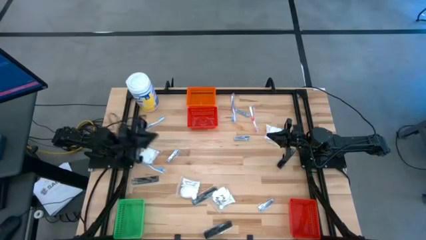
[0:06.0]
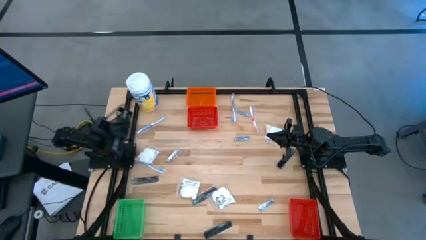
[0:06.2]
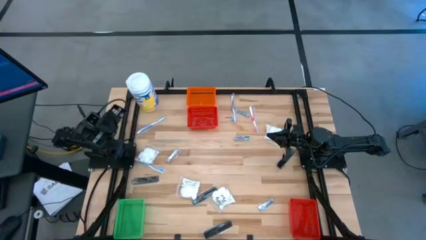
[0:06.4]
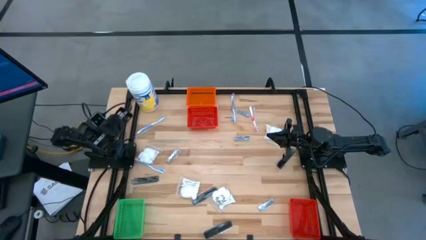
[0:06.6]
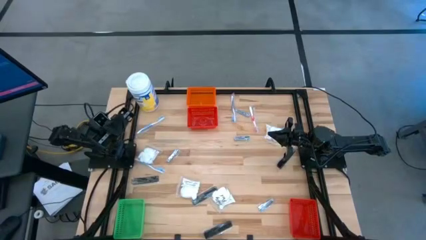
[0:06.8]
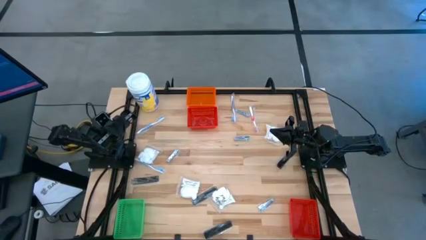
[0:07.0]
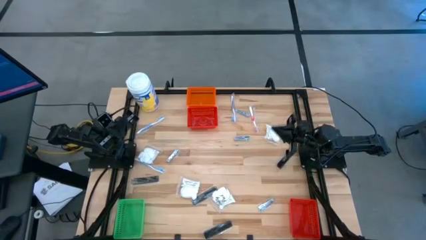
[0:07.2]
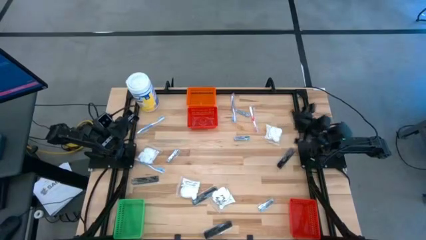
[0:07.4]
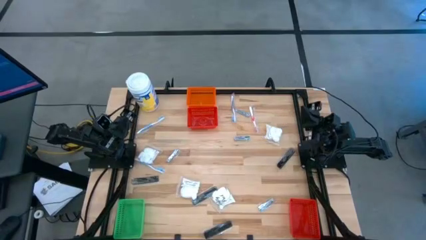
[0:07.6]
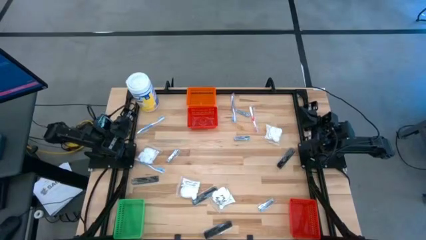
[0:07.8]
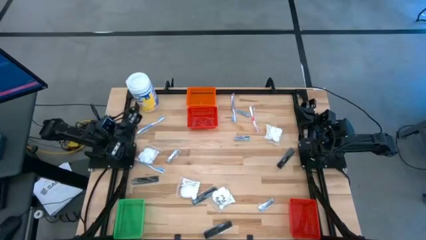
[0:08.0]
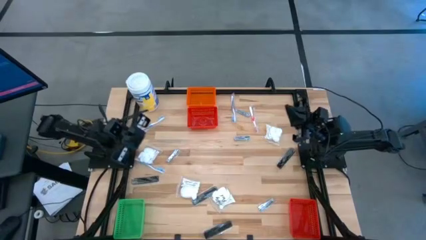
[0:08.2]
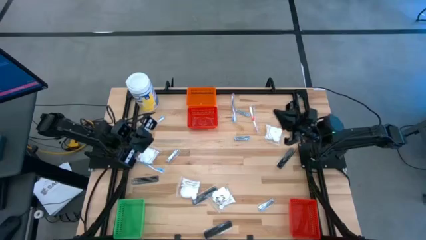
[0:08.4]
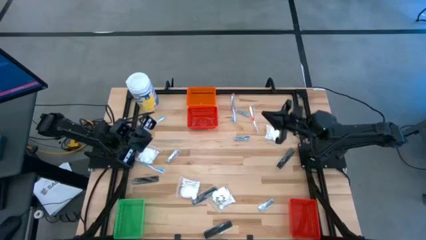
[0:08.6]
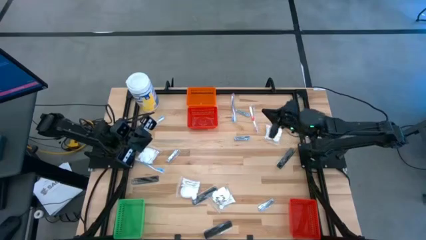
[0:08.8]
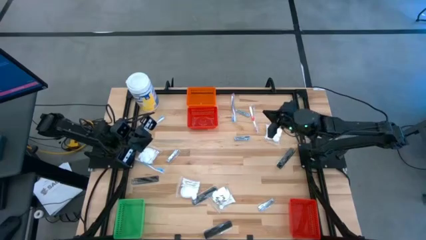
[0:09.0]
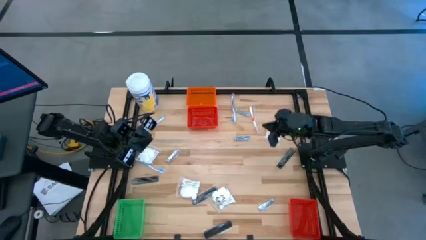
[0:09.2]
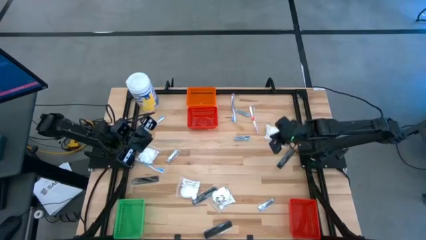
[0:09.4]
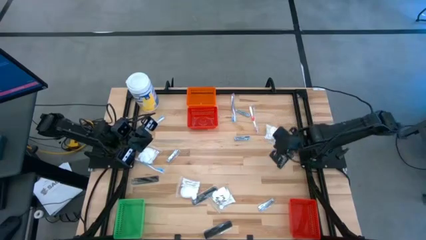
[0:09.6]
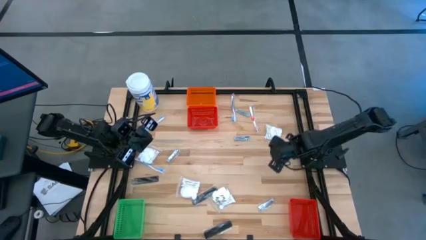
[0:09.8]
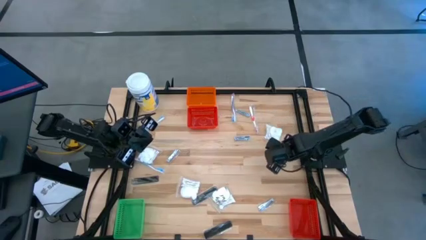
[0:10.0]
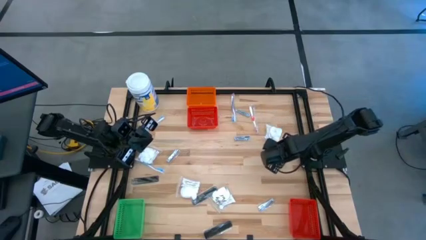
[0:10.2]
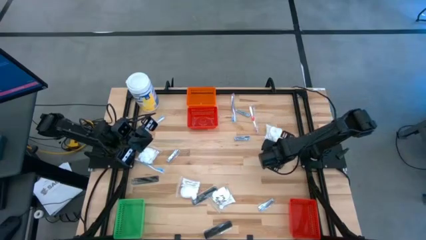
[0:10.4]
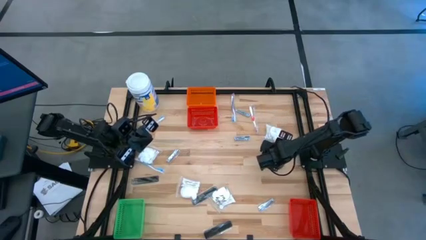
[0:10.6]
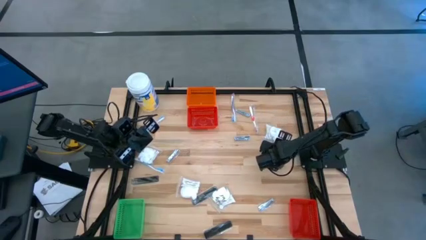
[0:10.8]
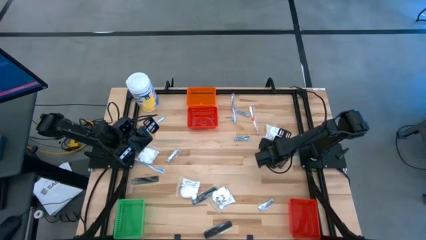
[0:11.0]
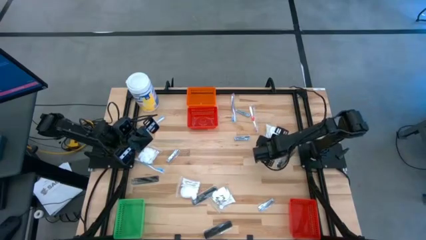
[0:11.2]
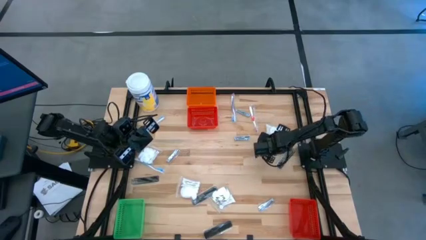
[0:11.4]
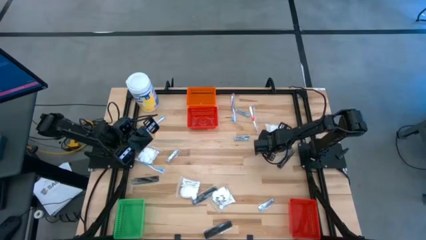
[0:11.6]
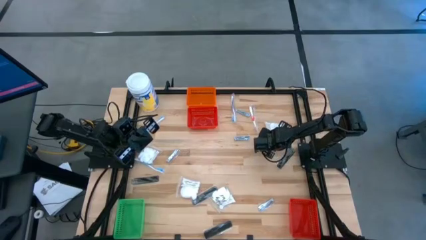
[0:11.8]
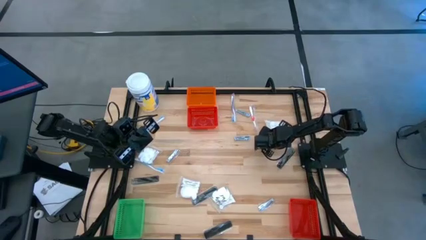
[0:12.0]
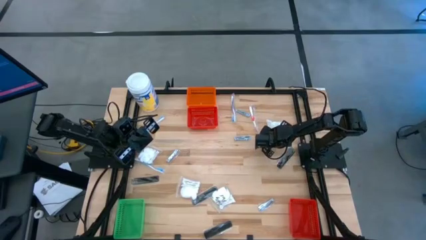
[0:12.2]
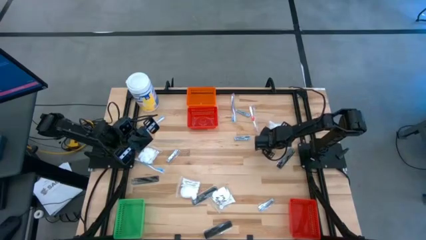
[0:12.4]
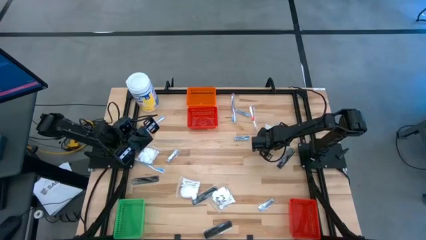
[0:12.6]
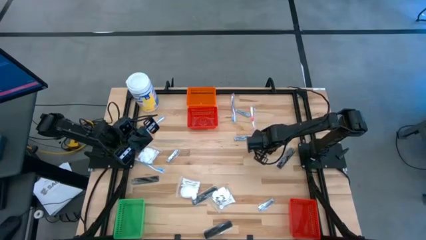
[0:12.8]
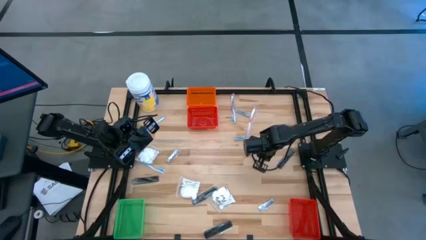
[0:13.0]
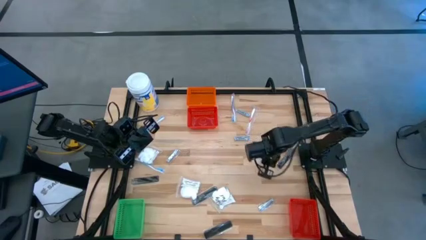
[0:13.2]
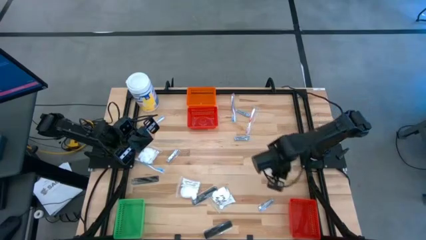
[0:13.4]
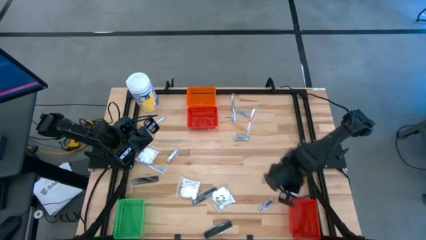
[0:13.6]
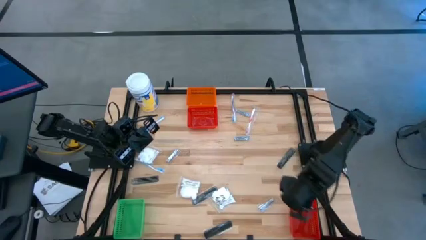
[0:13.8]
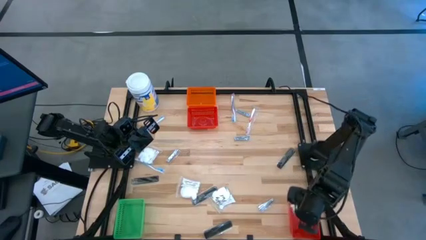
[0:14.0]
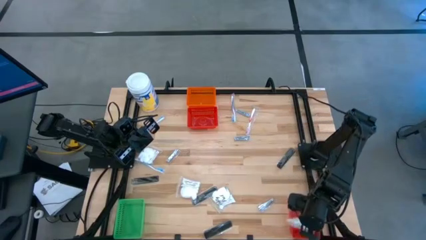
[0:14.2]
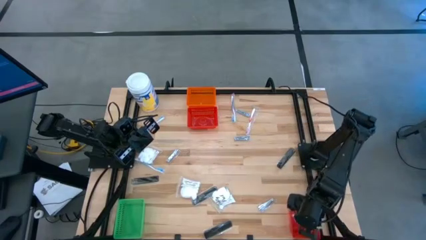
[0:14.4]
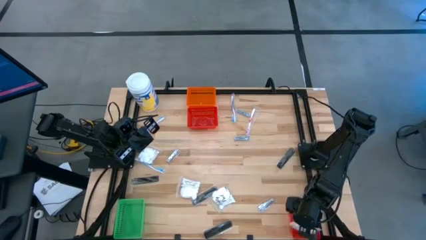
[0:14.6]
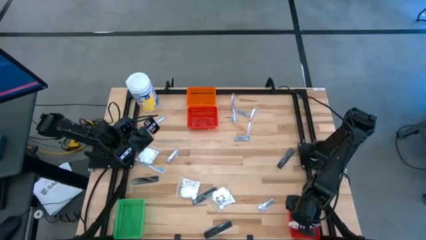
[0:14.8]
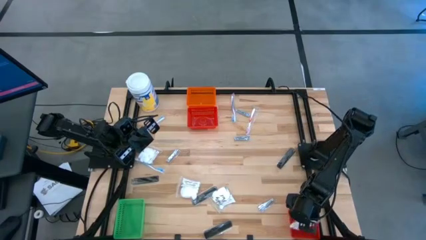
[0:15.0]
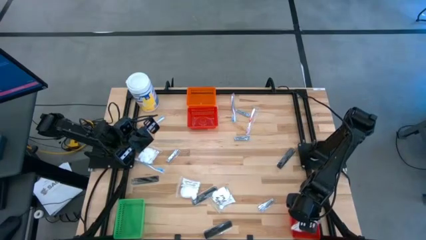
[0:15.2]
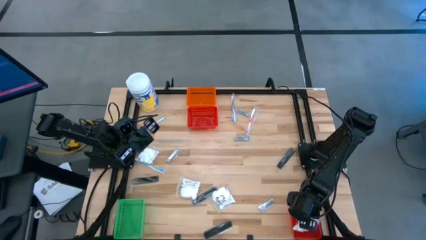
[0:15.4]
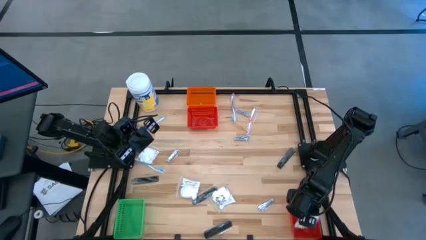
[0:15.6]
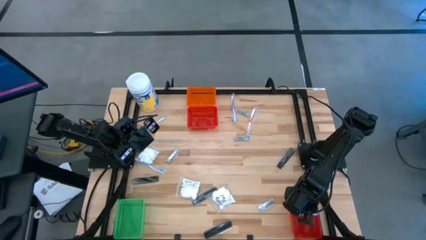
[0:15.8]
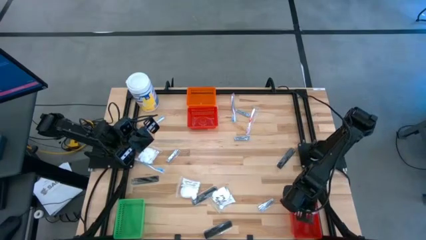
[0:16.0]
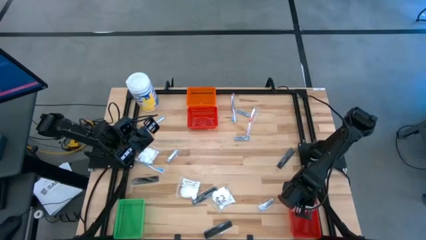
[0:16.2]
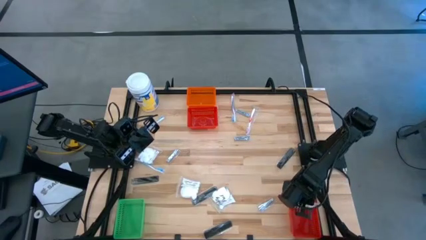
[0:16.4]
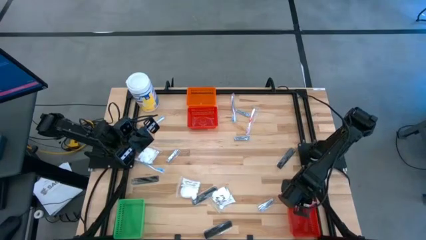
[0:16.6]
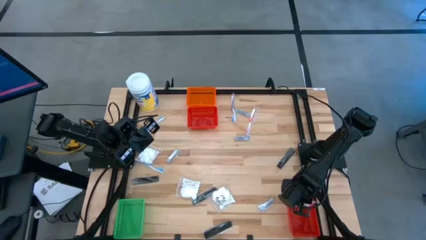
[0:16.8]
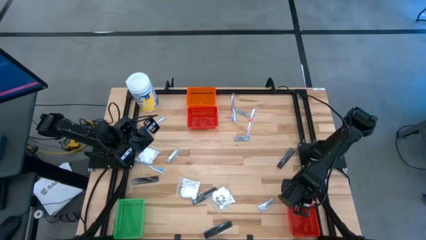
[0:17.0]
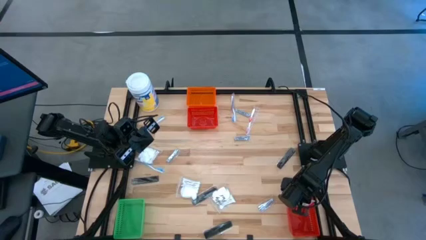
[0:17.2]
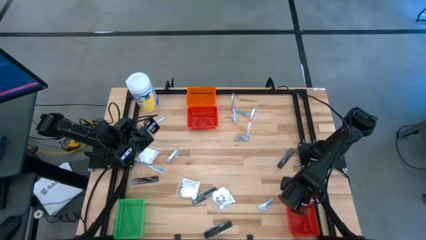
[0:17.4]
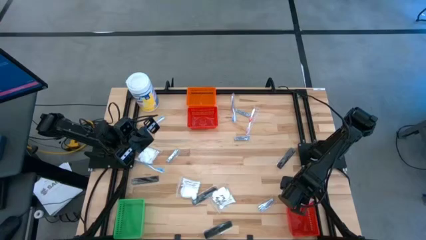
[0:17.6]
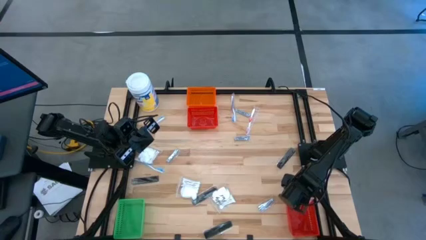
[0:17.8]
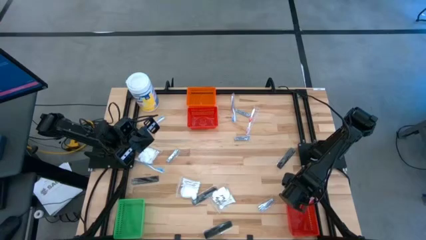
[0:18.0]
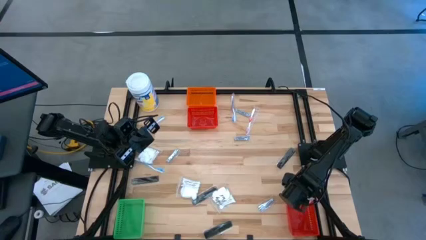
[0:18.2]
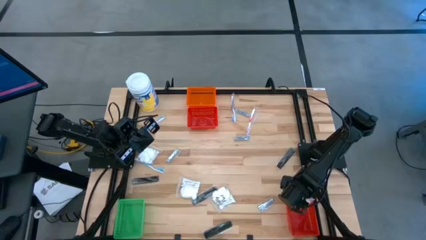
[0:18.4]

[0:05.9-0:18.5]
Task: Pick & Place Travel size toiletries
Put the cotton pack into the bottom red basket
